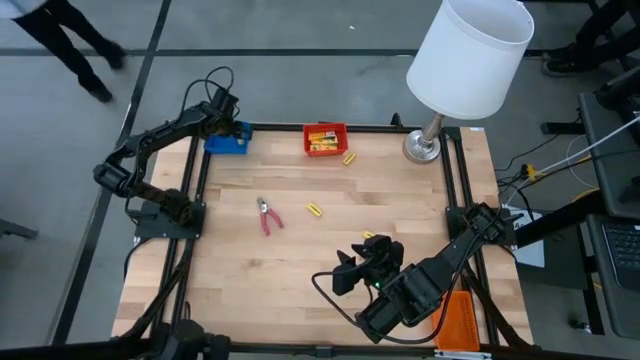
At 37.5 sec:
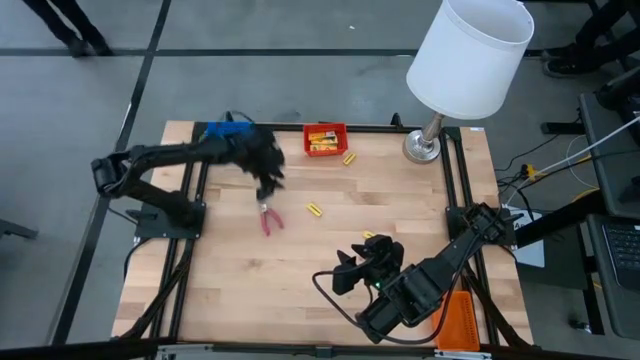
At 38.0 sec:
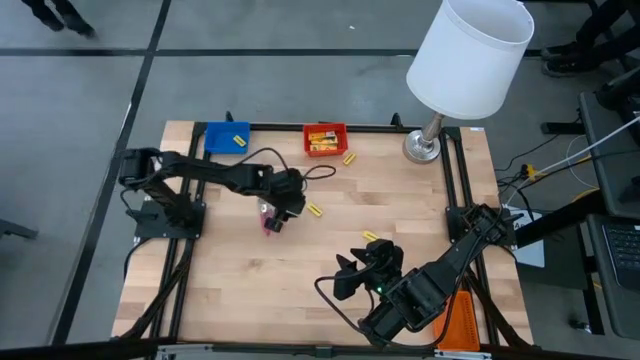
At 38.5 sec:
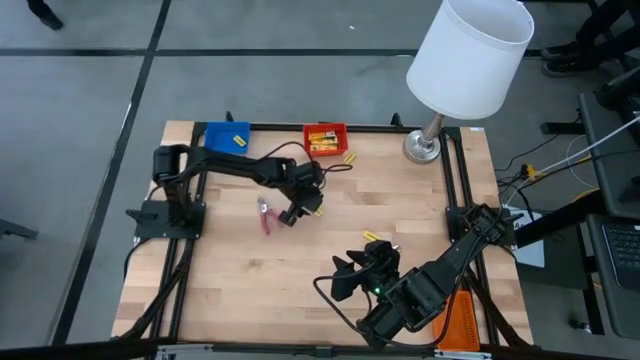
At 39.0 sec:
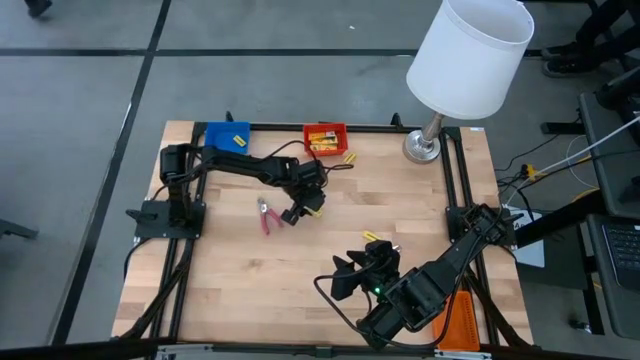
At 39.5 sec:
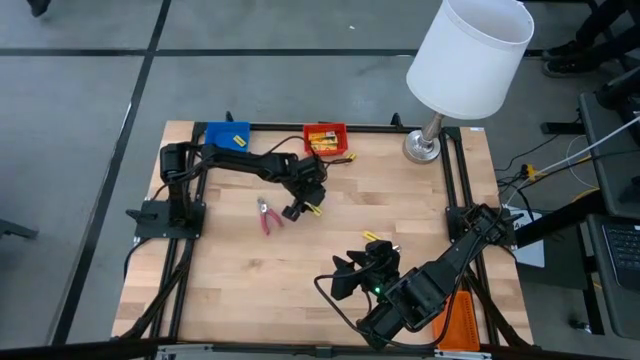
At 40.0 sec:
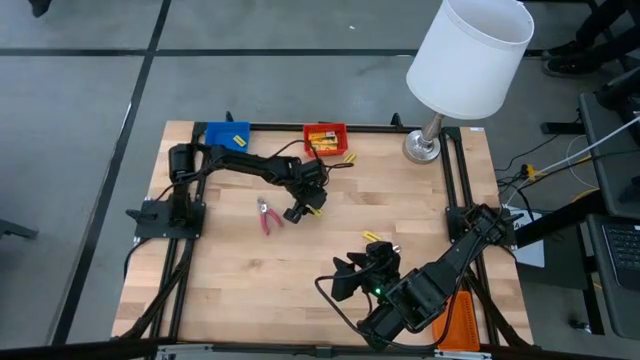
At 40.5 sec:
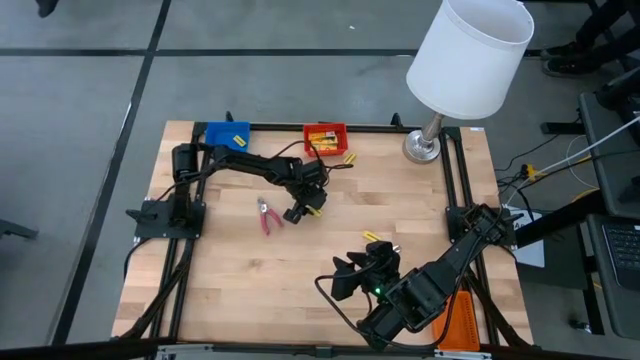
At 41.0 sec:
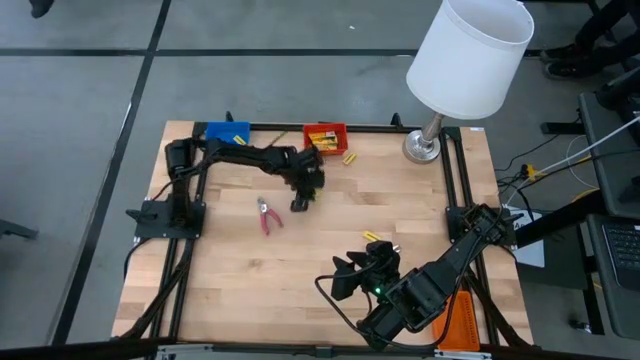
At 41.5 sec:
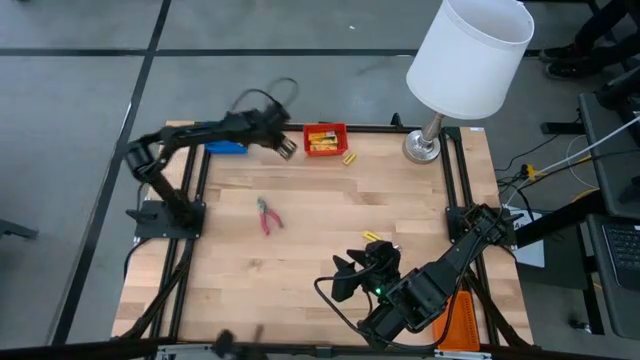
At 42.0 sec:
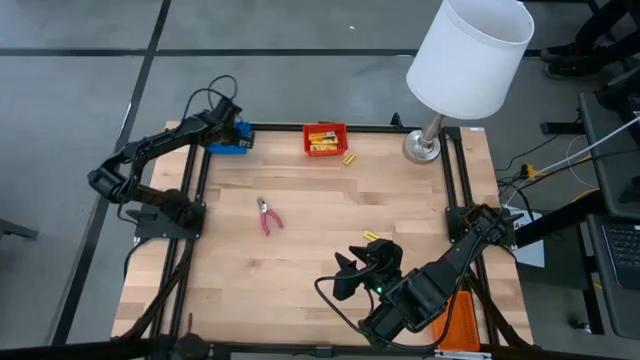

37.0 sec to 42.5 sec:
Task: Pick & Place School Supplies
Put the yellow eraser into the blue bin

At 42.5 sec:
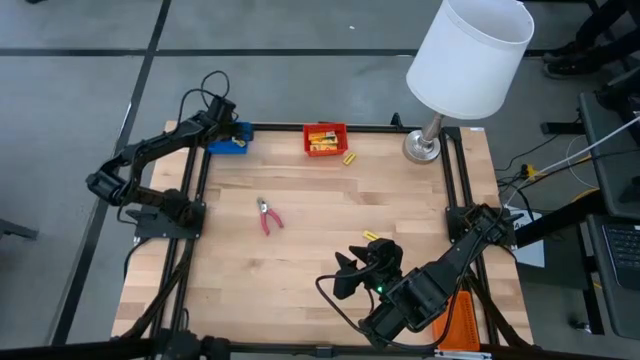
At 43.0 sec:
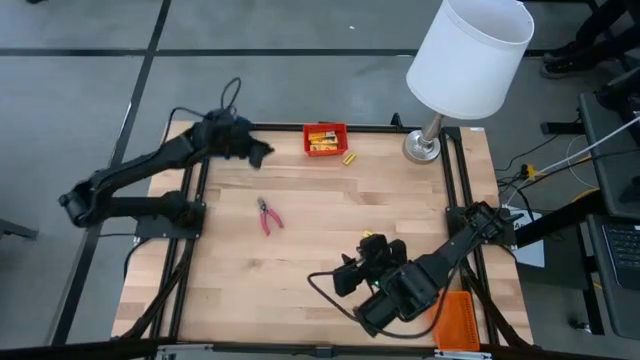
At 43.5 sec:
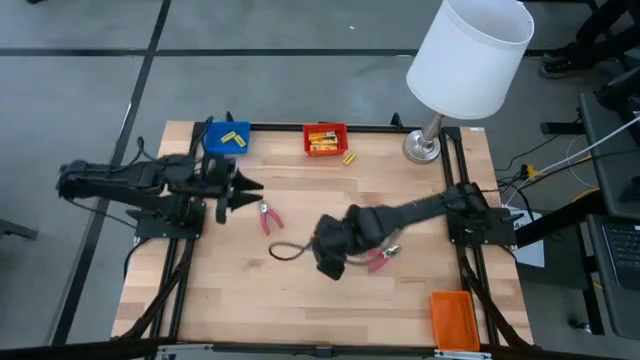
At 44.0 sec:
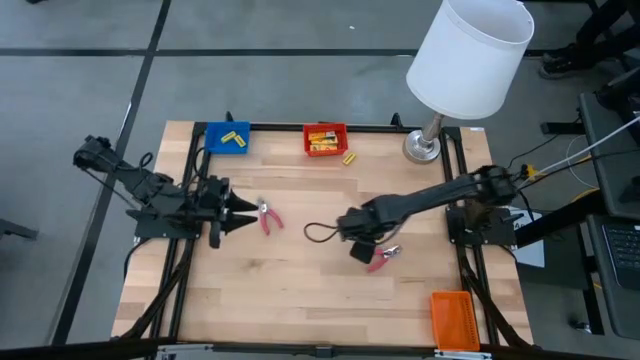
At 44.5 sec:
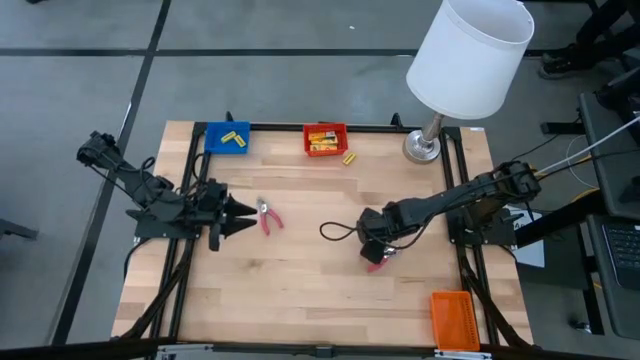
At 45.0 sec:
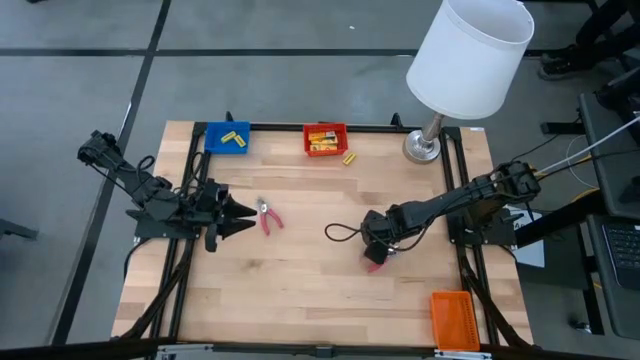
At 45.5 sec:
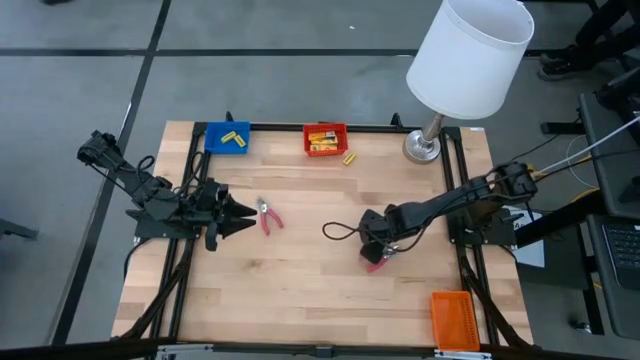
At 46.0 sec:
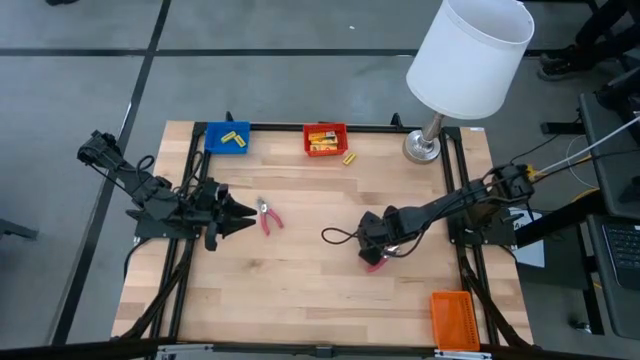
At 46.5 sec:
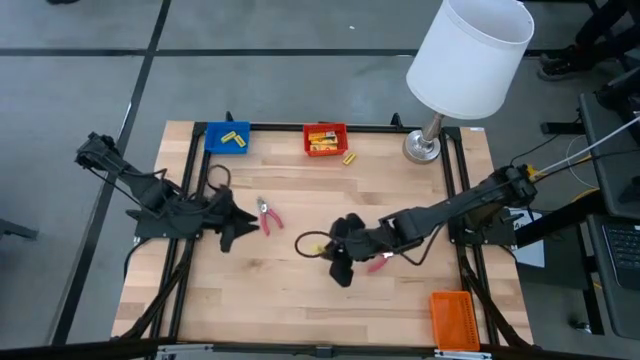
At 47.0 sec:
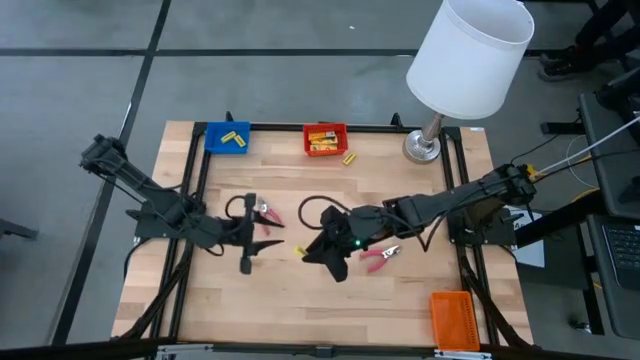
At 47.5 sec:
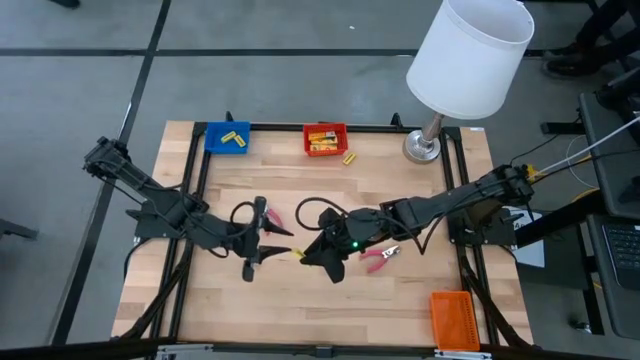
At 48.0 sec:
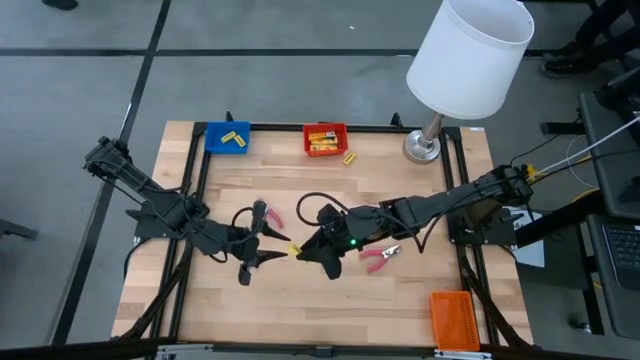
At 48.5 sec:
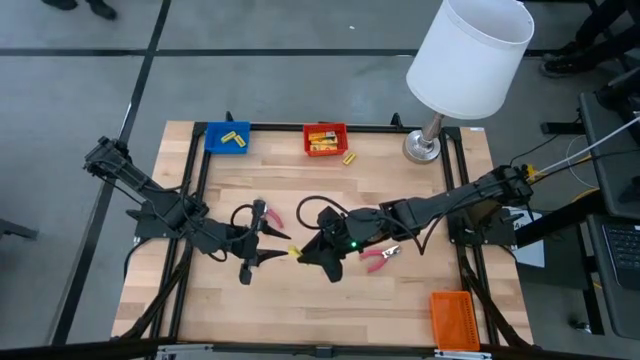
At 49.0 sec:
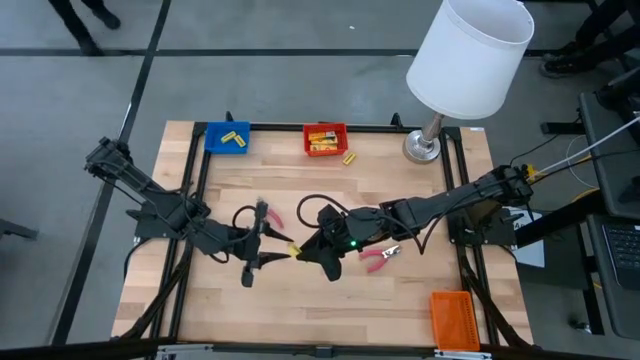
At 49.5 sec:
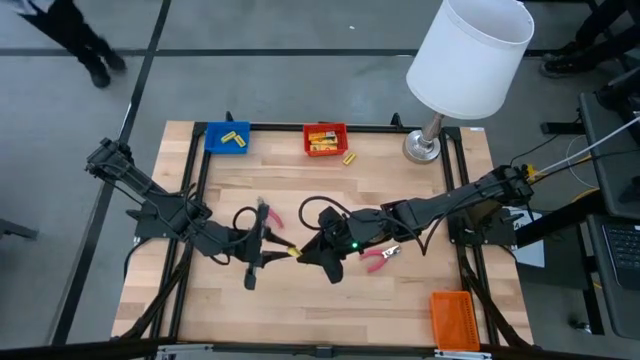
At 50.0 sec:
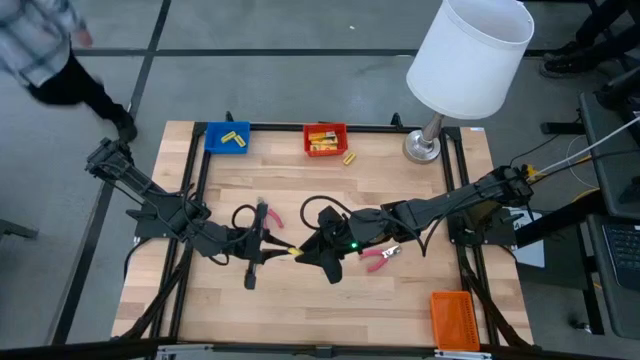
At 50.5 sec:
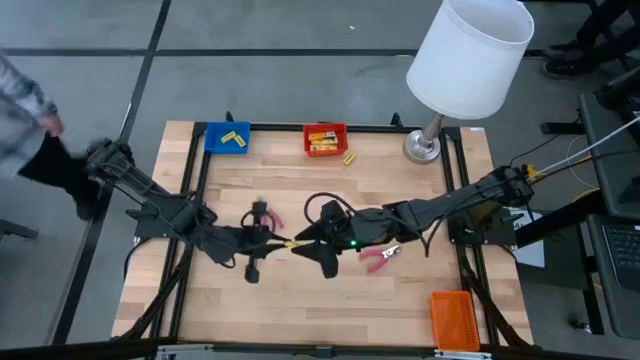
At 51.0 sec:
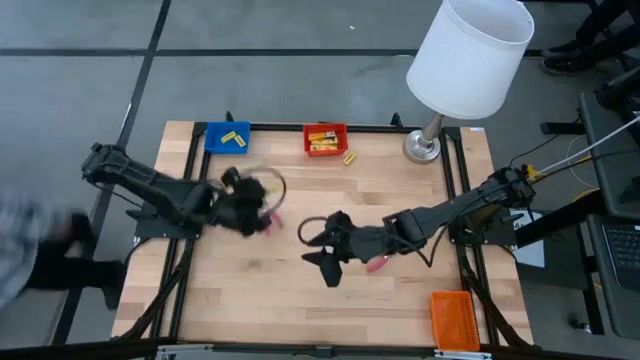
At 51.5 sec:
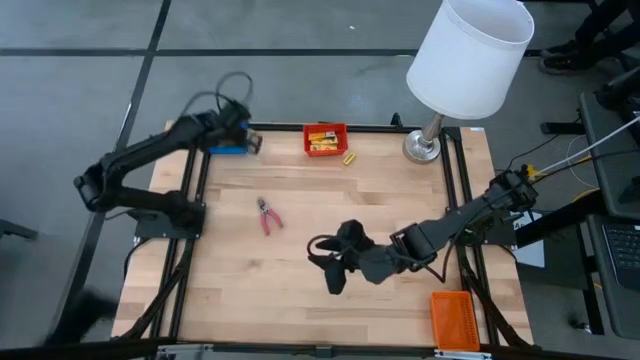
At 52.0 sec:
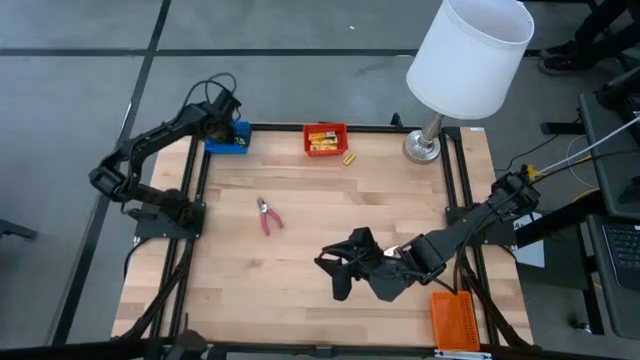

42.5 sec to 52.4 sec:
Put the yellow eraser into the blue bin

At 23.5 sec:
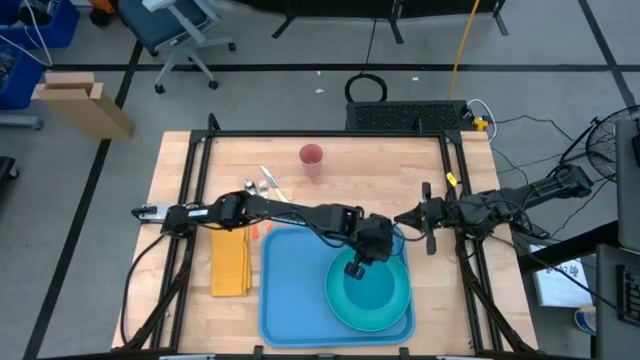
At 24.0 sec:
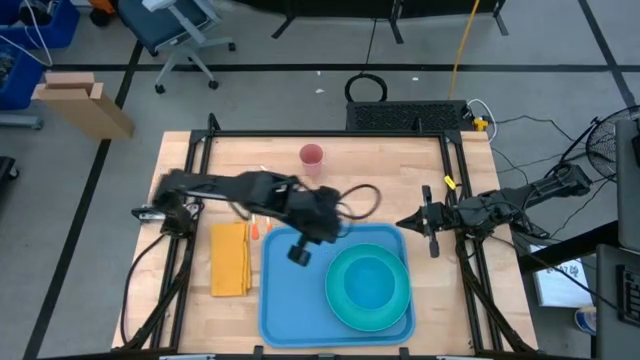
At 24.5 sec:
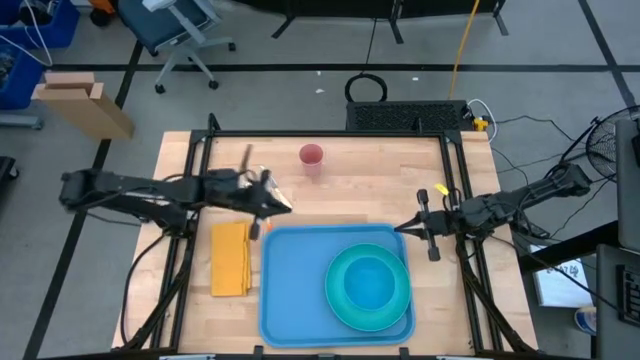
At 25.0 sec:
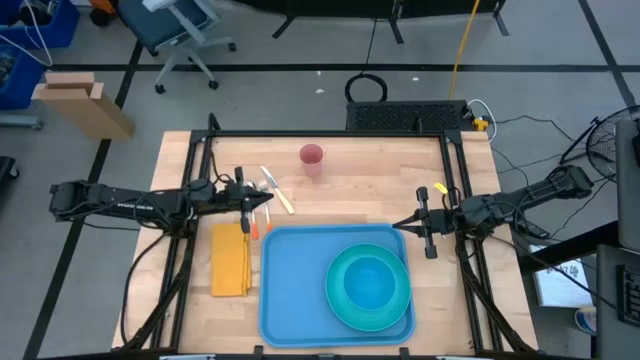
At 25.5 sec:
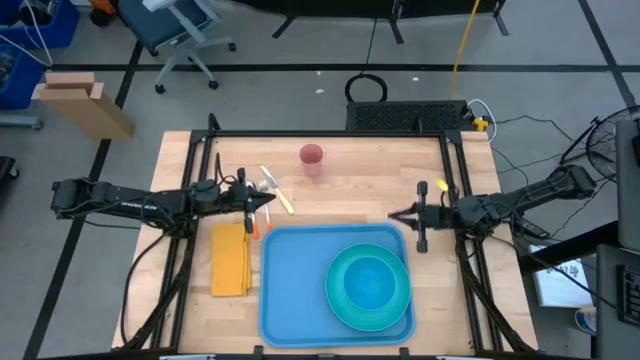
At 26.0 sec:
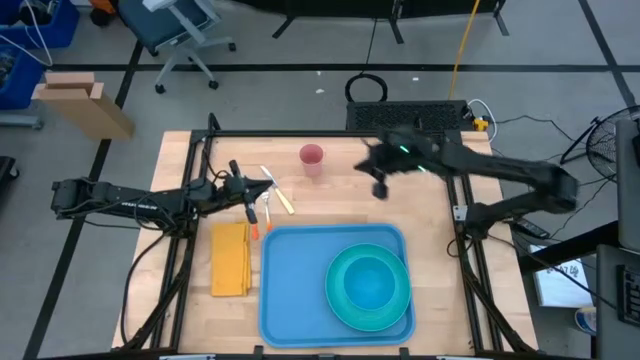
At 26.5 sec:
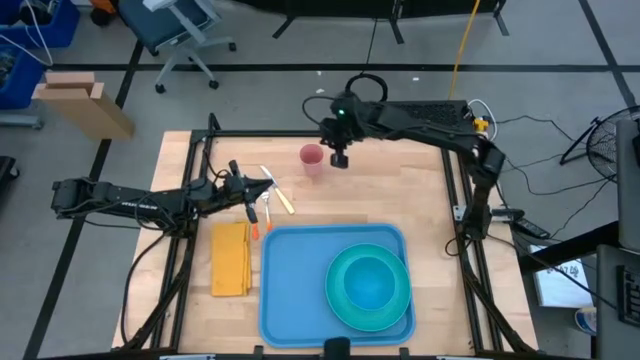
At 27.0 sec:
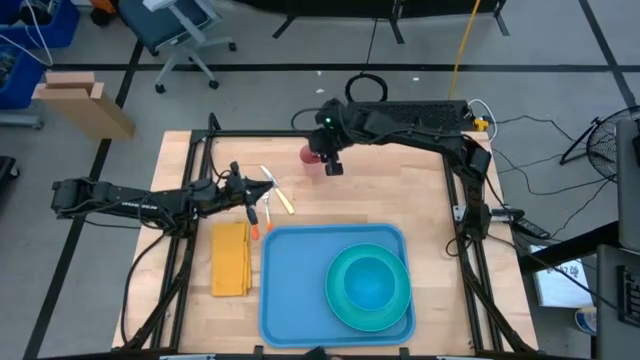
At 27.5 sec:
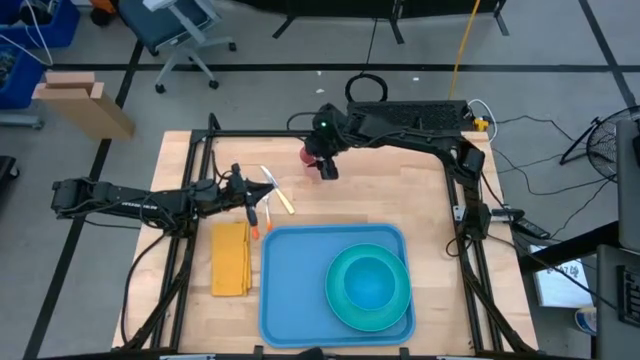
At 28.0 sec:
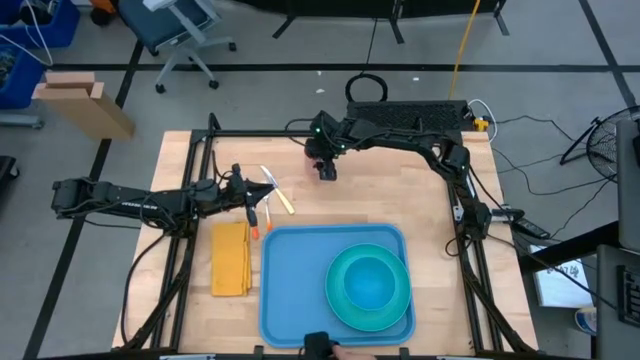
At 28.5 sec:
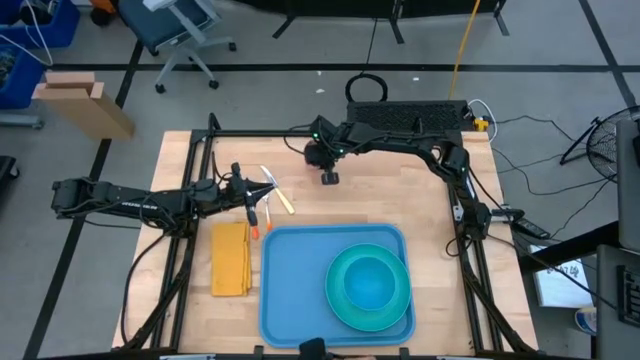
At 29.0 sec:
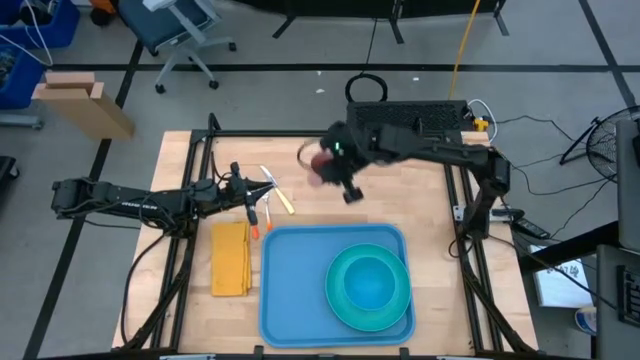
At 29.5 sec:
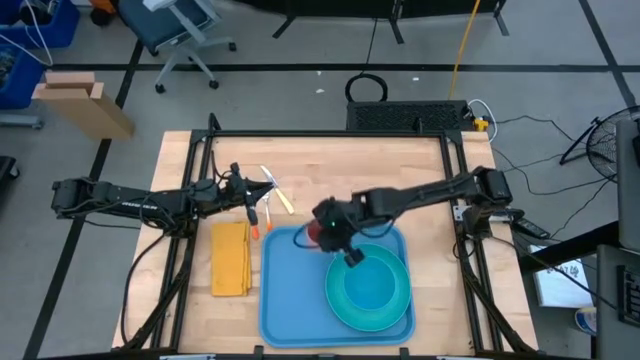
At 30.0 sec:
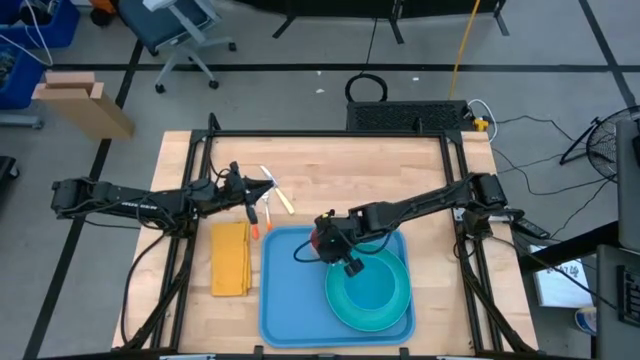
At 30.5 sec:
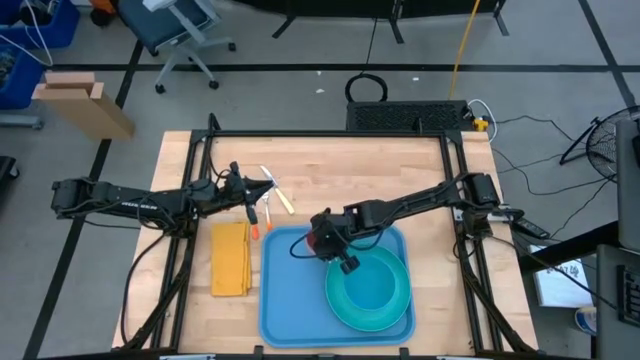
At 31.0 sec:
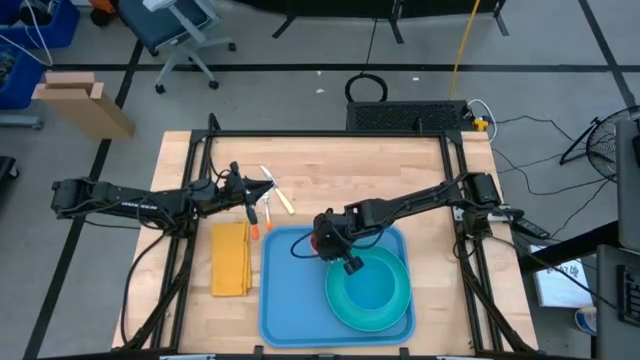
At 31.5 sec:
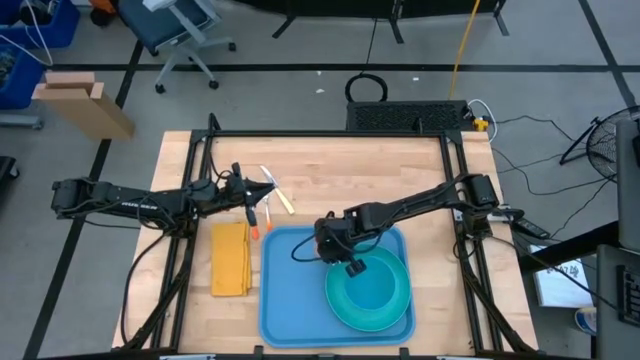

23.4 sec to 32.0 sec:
Task: Set up tray
Put the pink cup on the blue serving tray to the top left of the light green plate
